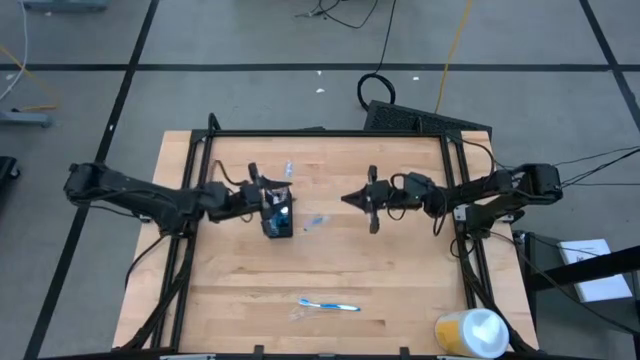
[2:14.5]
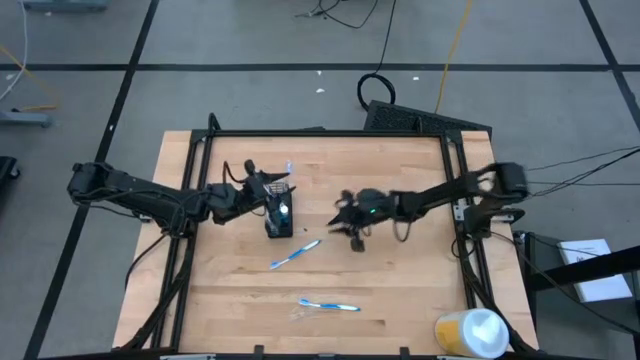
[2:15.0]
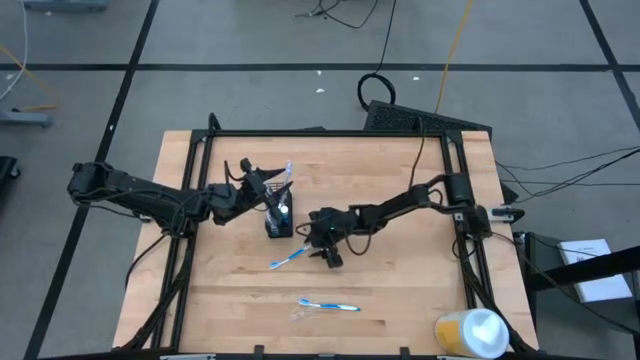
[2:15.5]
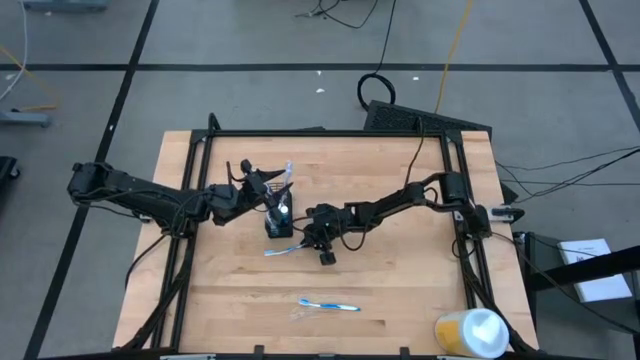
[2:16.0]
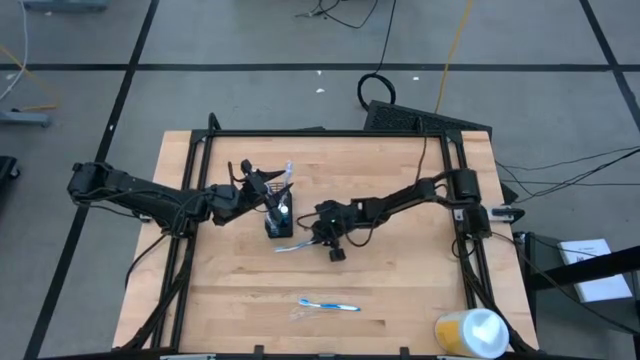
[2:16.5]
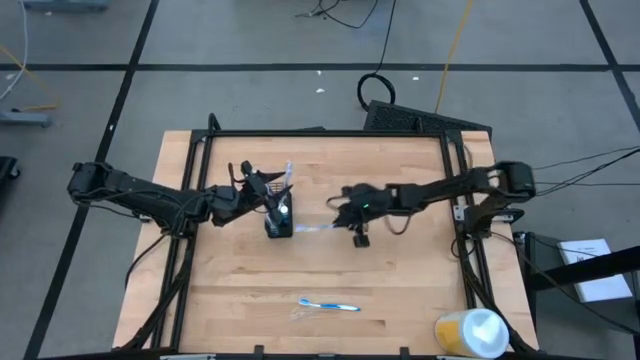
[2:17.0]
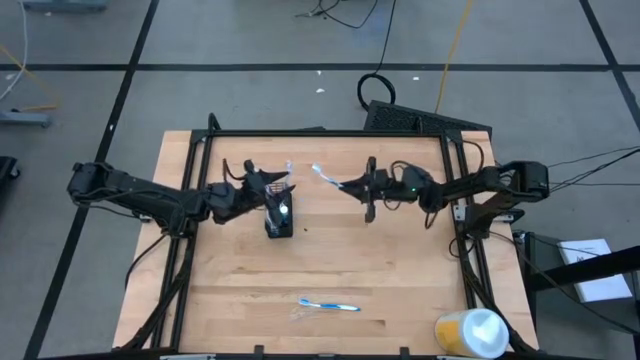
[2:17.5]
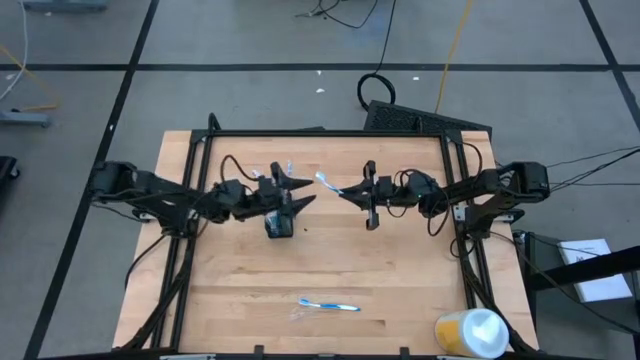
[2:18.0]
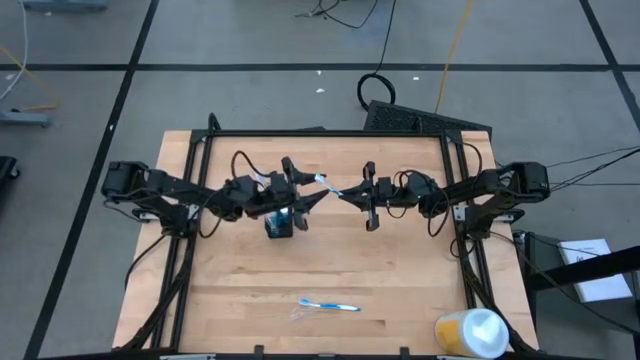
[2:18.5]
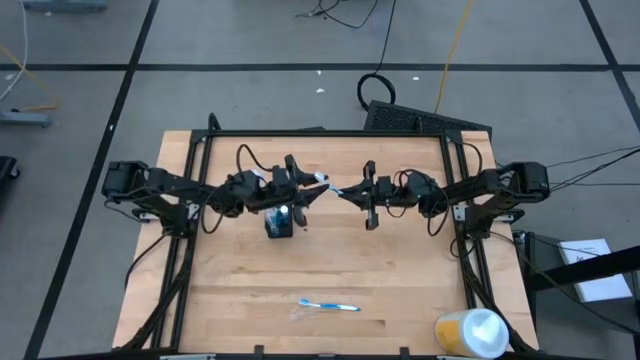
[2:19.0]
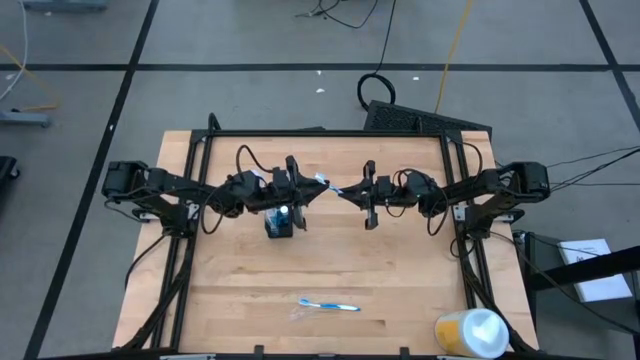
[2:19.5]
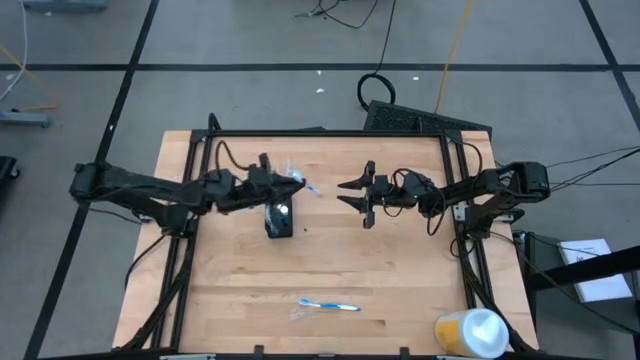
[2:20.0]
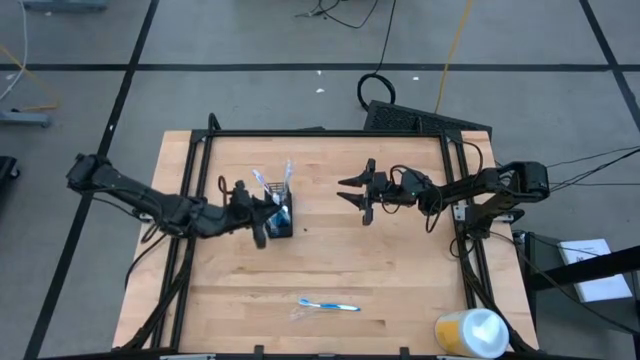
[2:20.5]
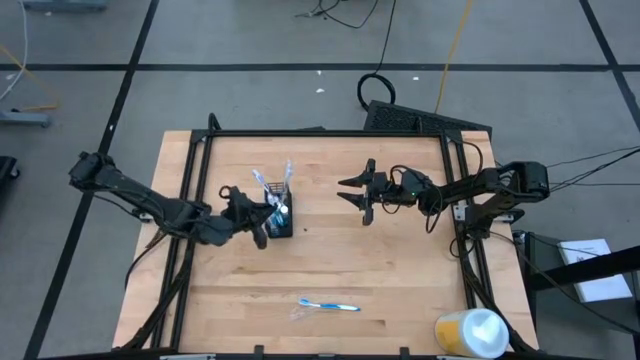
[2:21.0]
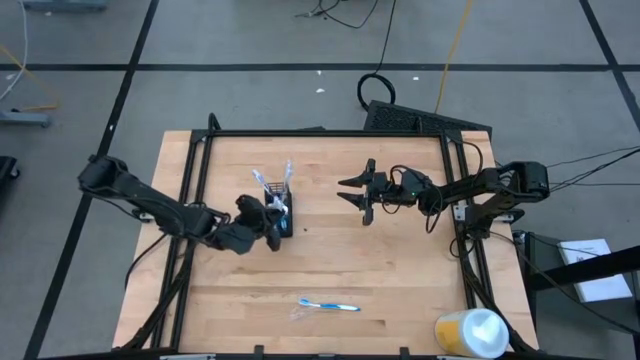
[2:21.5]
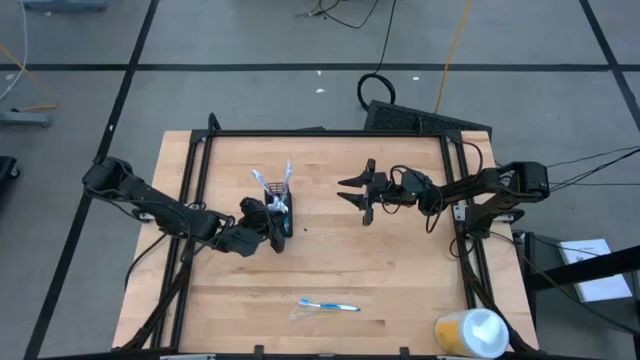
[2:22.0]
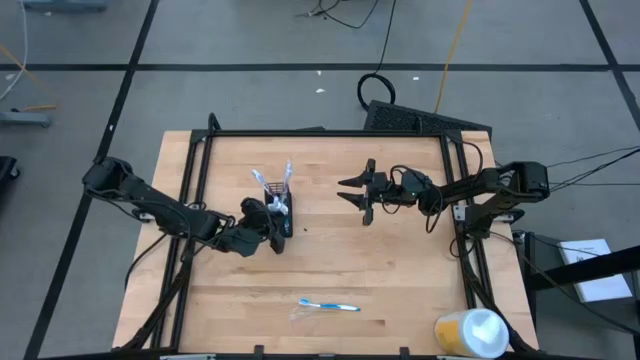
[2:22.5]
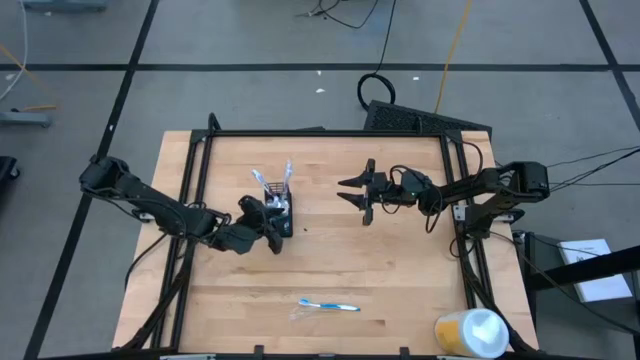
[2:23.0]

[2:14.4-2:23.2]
Task: Pick & Place toothbrushing station
Put the blue toothbrush into the black organizer

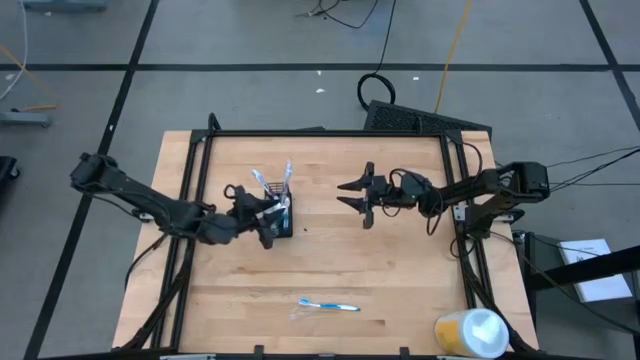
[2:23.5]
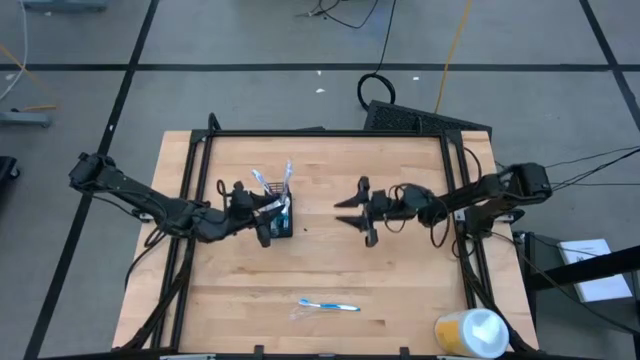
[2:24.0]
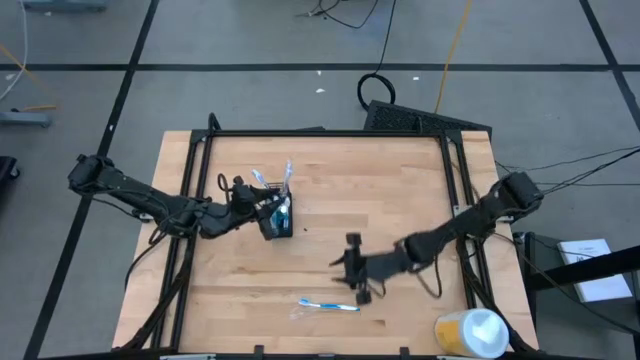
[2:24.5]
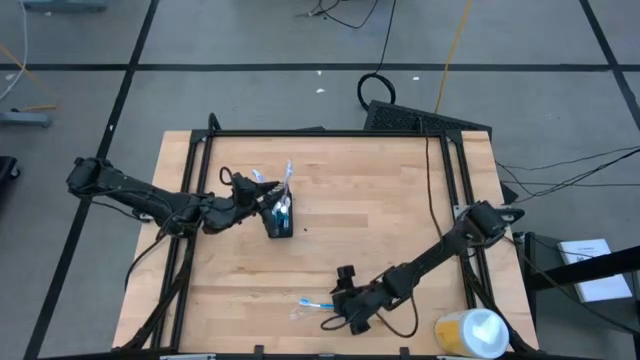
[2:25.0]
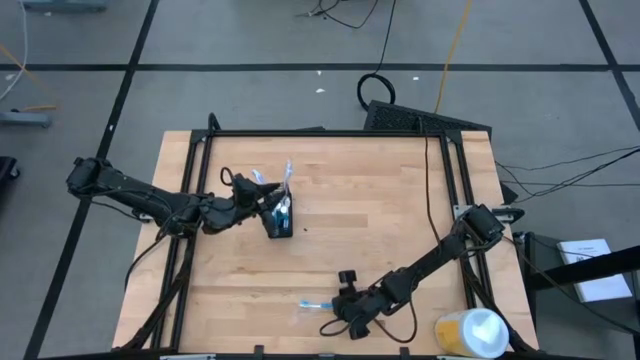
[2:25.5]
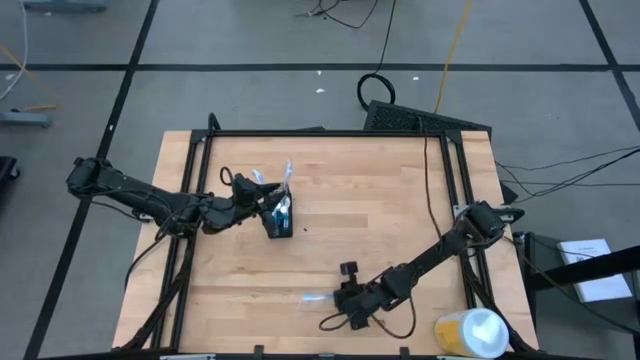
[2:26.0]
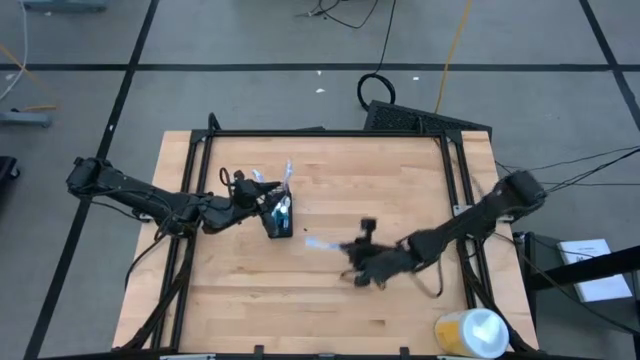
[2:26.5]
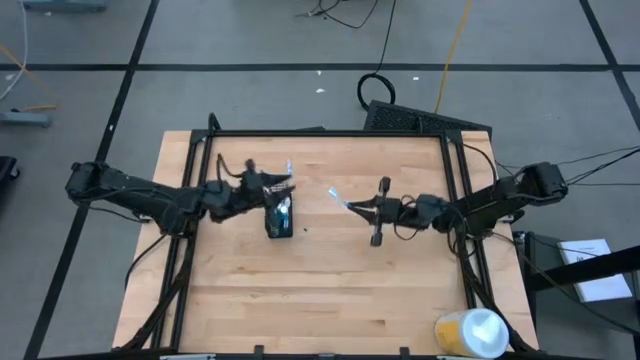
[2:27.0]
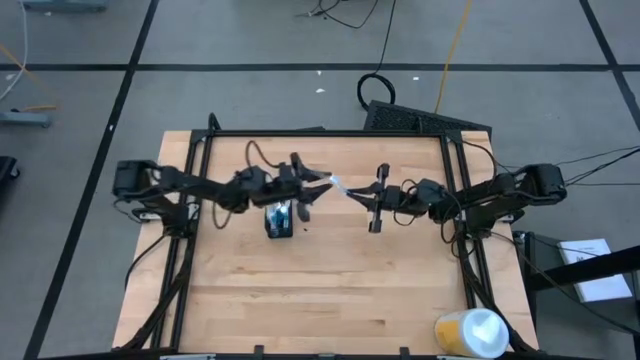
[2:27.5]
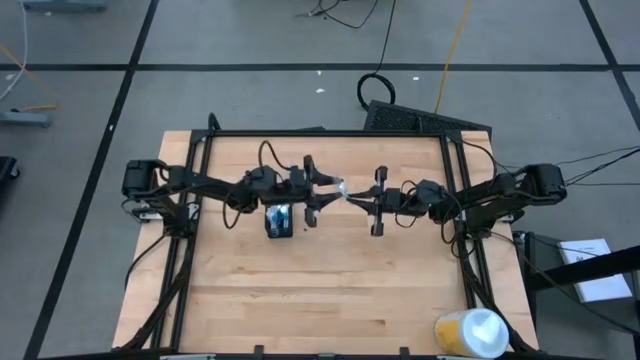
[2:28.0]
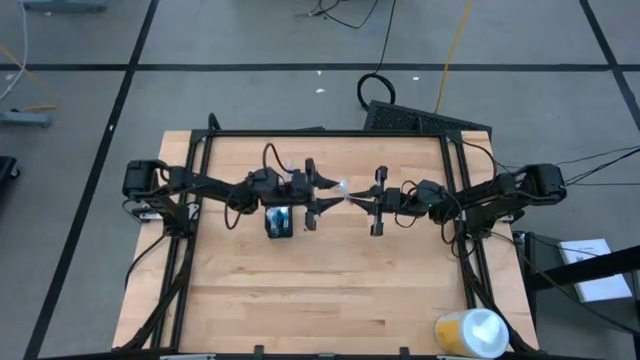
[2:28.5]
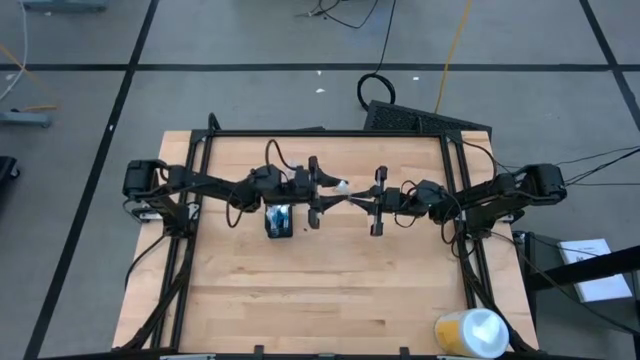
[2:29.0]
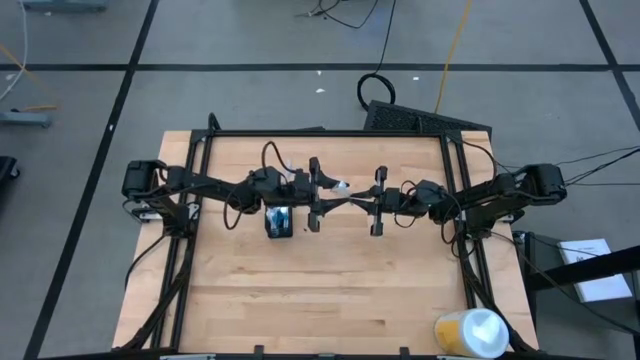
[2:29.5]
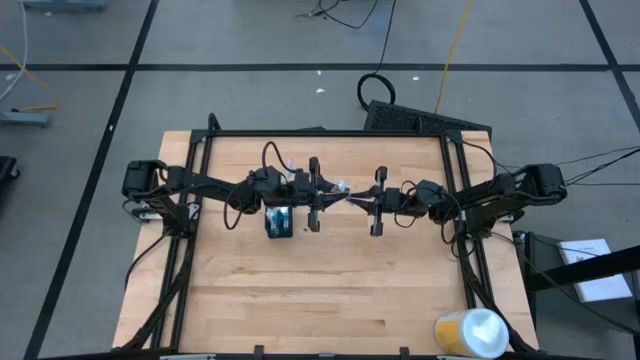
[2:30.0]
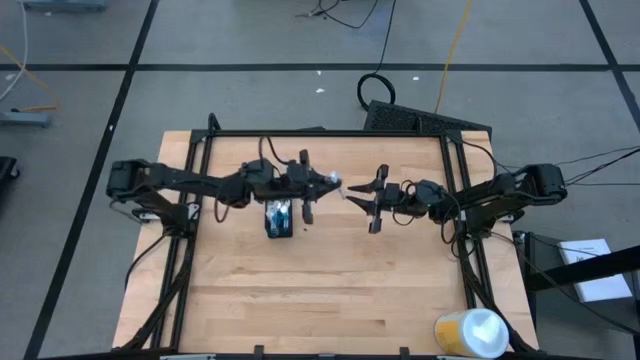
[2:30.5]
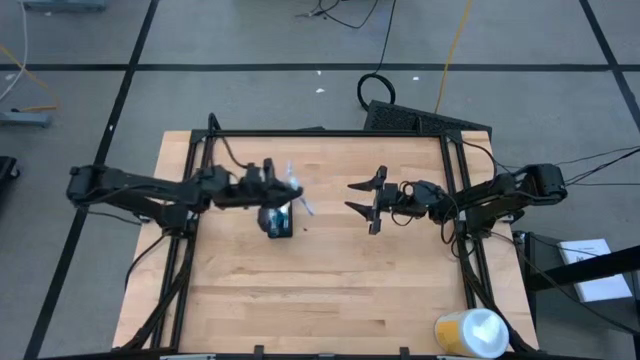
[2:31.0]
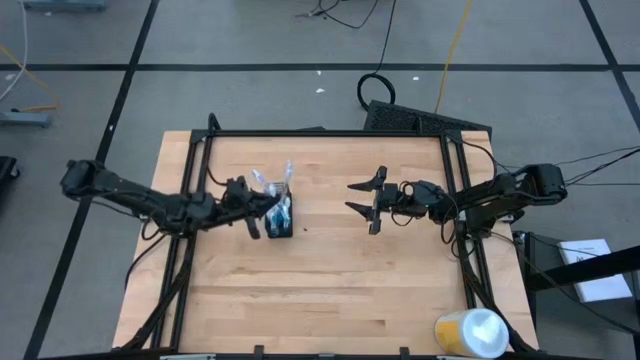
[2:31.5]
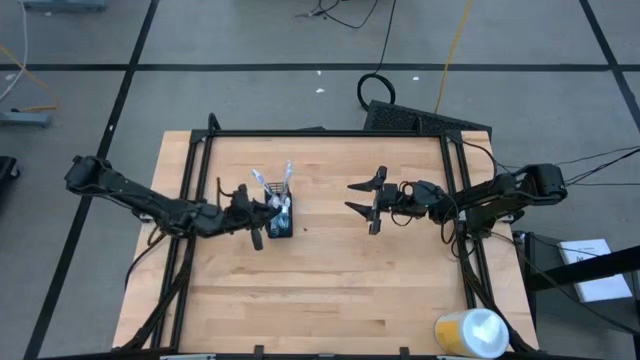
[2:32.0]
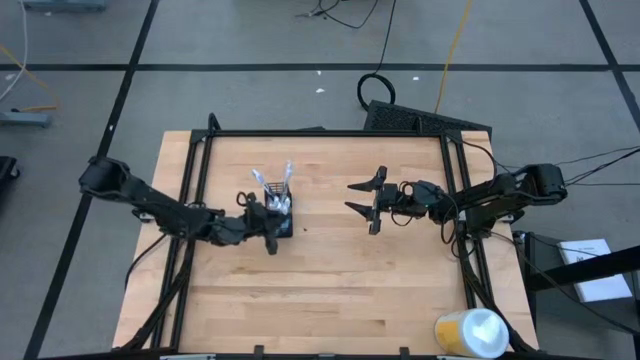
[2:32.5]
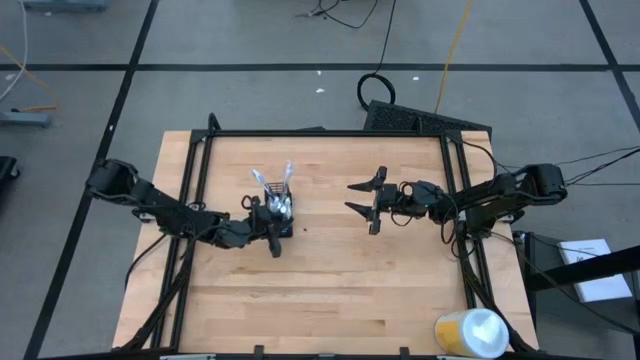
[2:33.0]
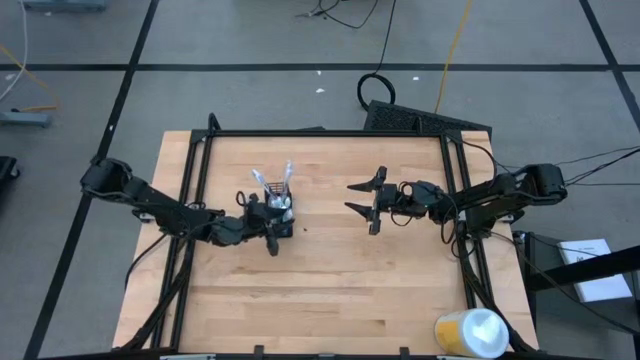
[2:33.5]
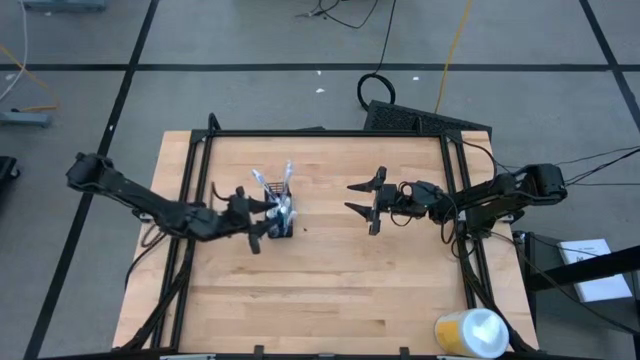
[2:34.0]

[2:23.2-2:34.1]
Put the blue toothbrush into the black organizer

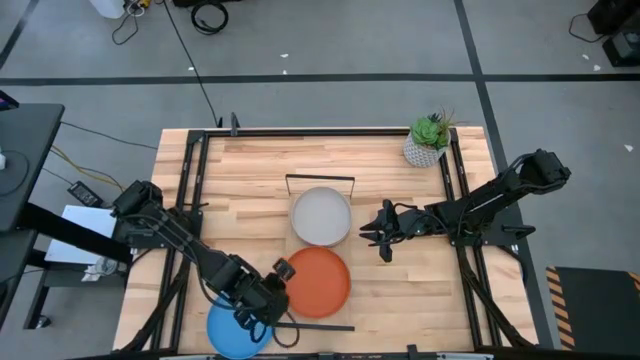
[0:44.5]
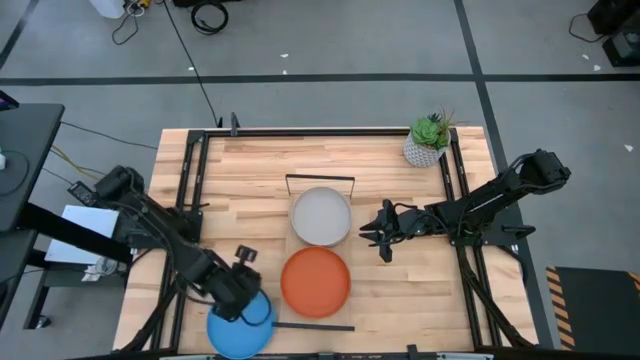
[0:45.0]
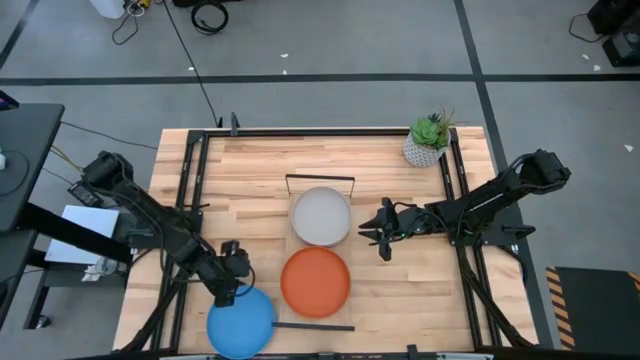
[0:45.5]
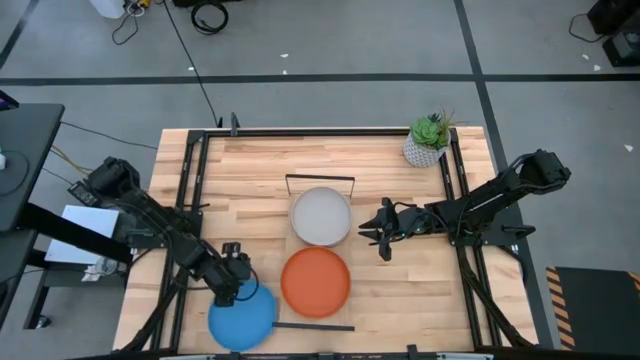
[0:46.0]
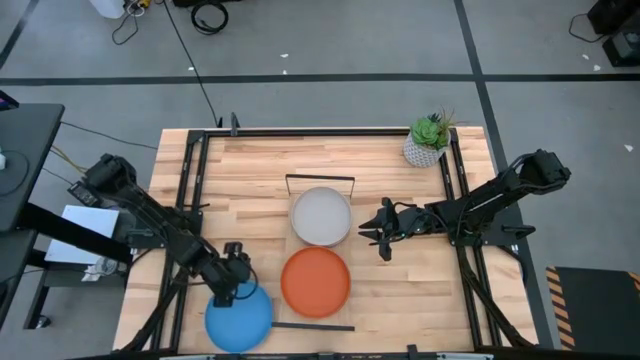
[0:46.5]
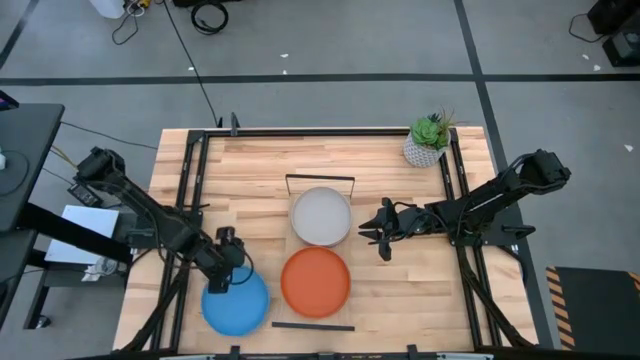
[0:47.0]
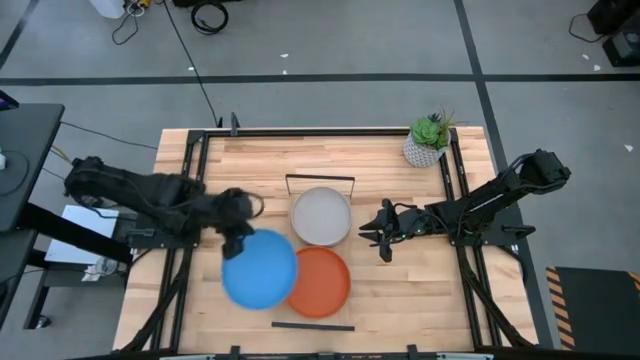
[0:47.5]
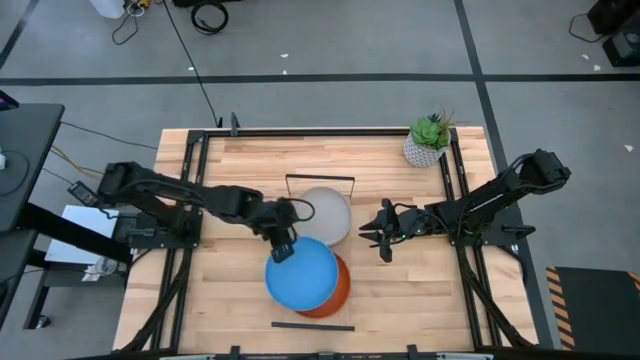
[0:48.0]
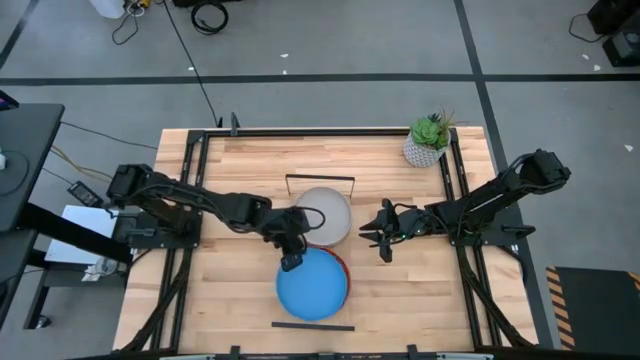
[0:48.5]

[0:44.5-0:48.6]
Task: Place and stack plates onto a shelf
Stack the blue plate on top of the dark blue plate on the shelf
